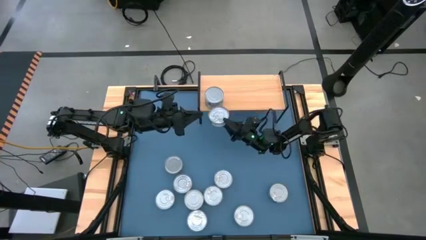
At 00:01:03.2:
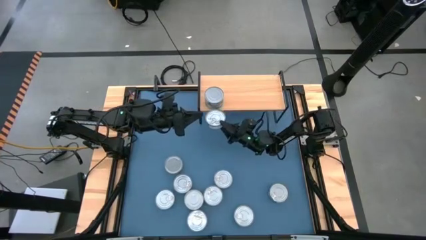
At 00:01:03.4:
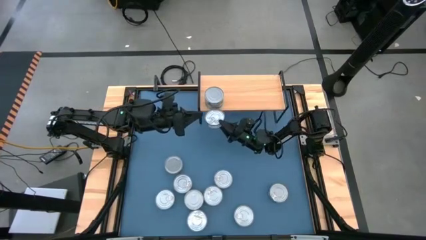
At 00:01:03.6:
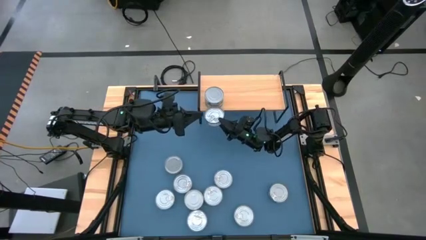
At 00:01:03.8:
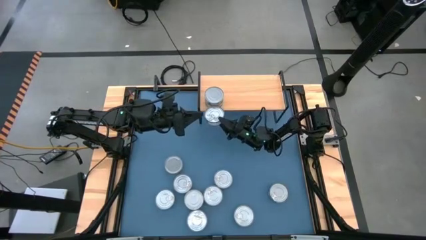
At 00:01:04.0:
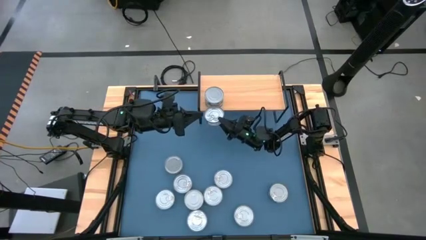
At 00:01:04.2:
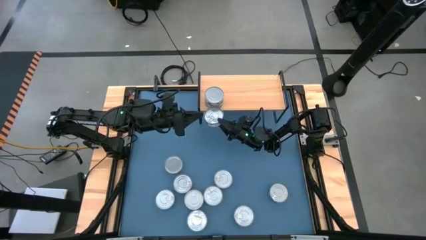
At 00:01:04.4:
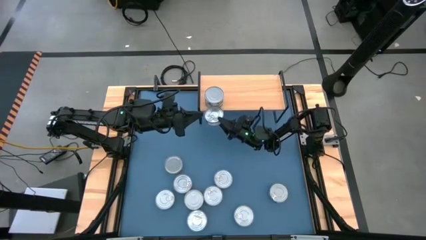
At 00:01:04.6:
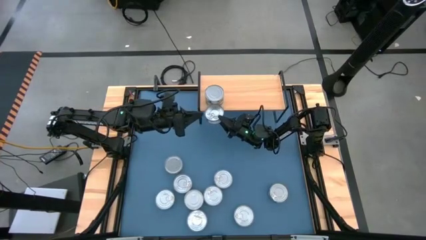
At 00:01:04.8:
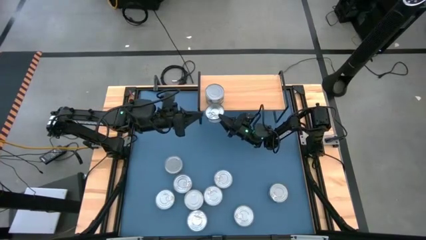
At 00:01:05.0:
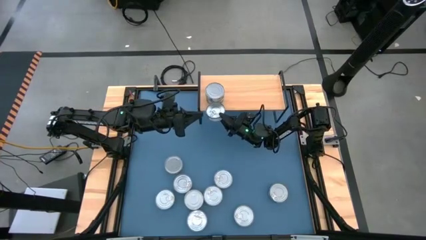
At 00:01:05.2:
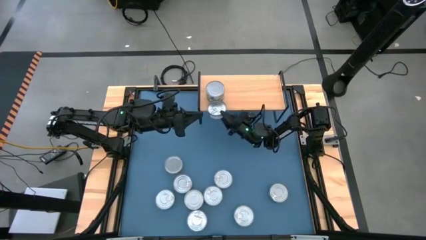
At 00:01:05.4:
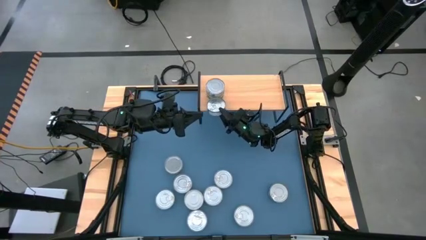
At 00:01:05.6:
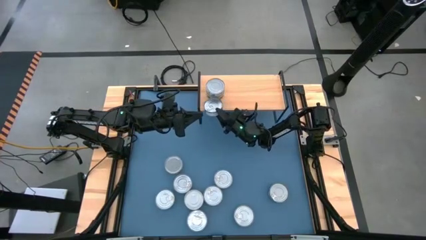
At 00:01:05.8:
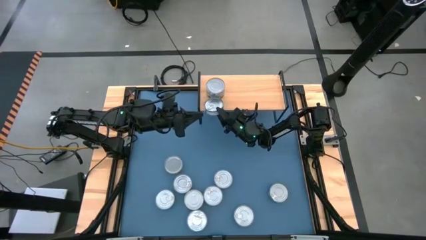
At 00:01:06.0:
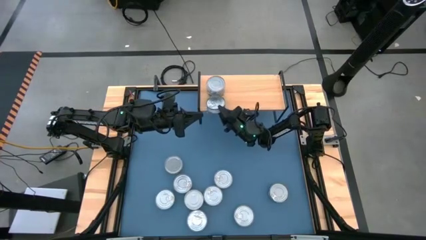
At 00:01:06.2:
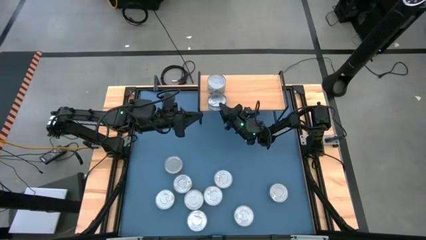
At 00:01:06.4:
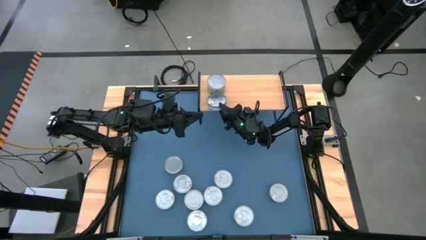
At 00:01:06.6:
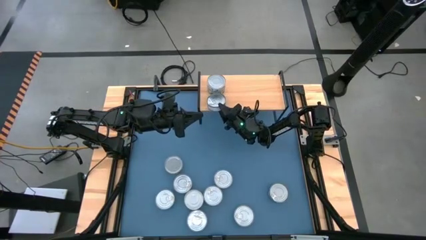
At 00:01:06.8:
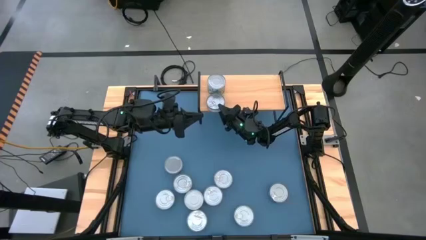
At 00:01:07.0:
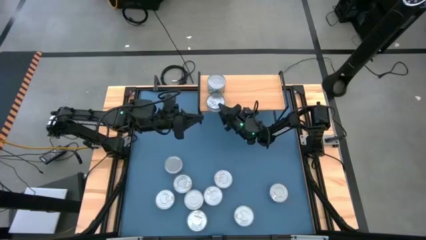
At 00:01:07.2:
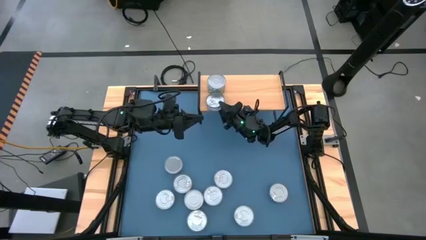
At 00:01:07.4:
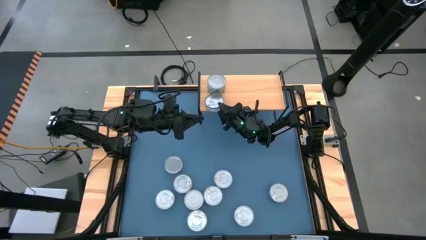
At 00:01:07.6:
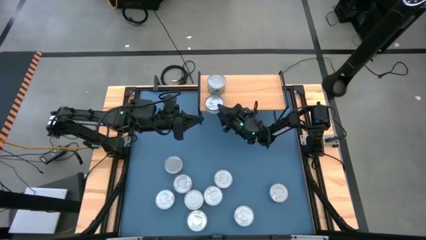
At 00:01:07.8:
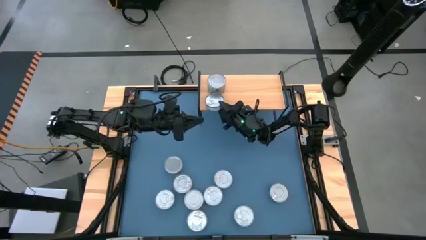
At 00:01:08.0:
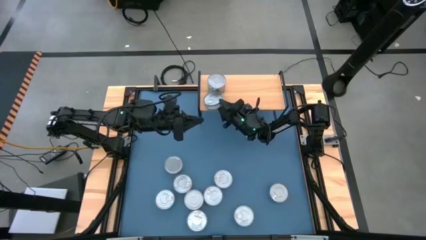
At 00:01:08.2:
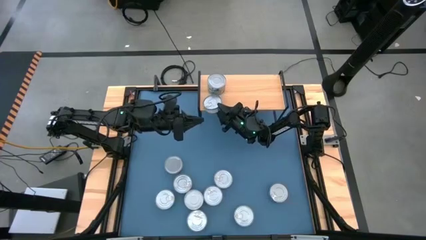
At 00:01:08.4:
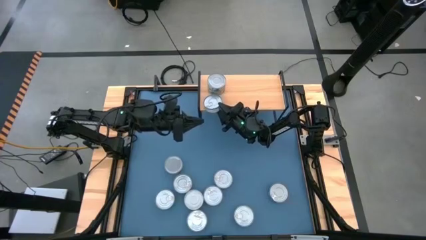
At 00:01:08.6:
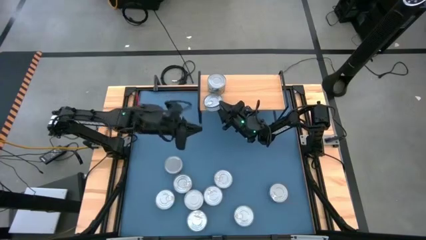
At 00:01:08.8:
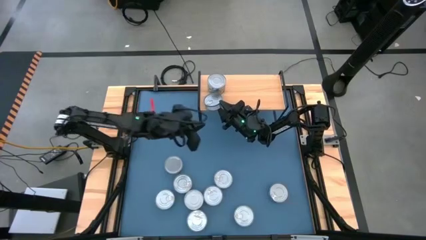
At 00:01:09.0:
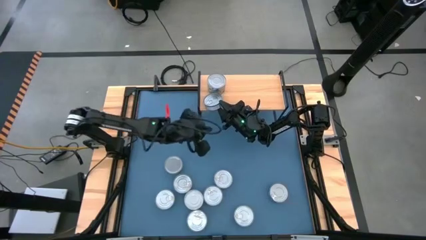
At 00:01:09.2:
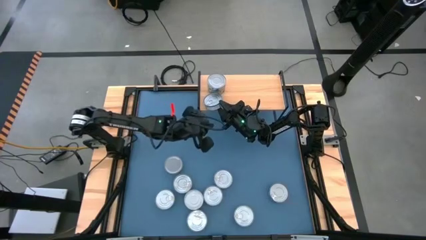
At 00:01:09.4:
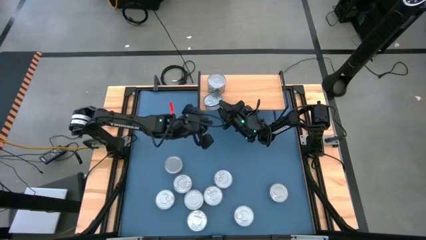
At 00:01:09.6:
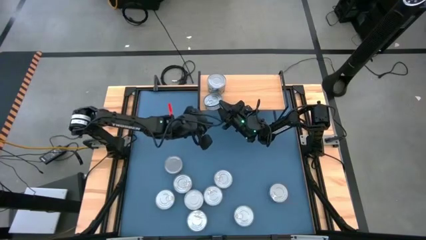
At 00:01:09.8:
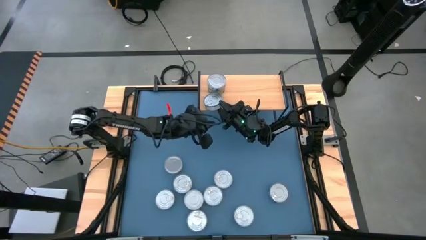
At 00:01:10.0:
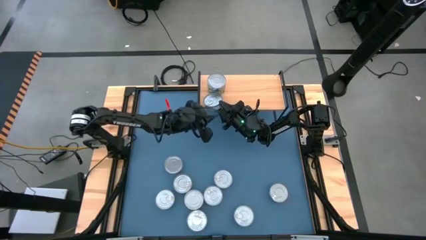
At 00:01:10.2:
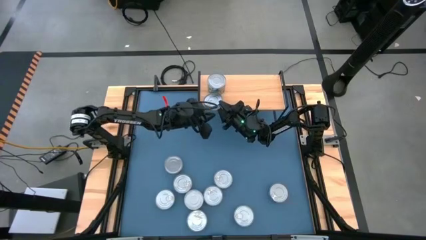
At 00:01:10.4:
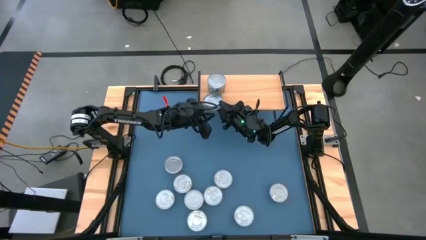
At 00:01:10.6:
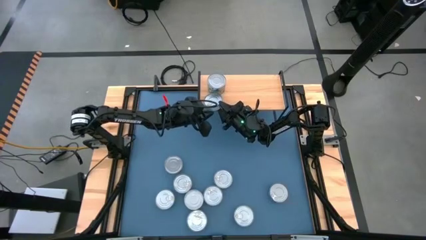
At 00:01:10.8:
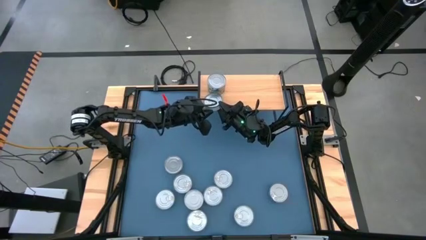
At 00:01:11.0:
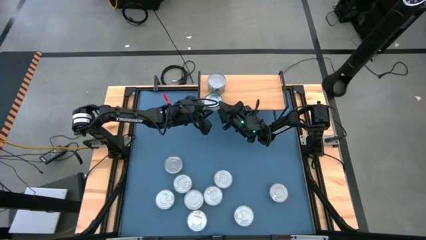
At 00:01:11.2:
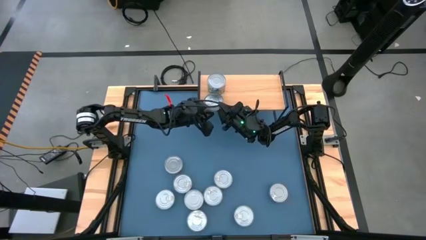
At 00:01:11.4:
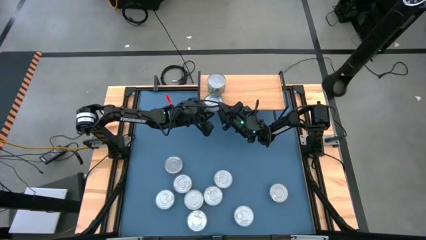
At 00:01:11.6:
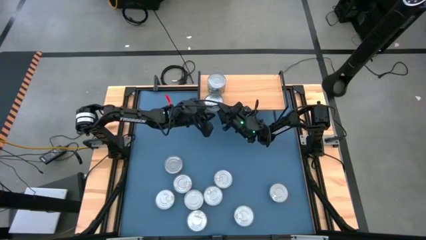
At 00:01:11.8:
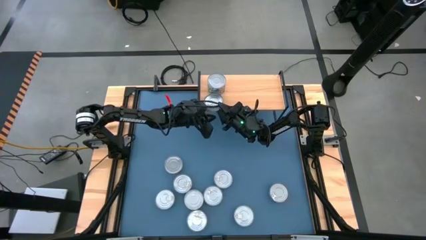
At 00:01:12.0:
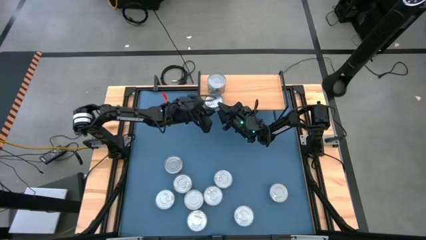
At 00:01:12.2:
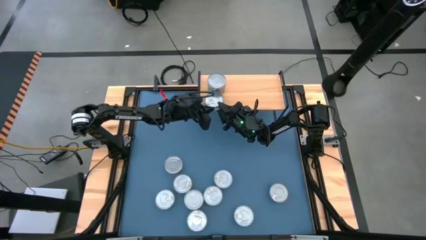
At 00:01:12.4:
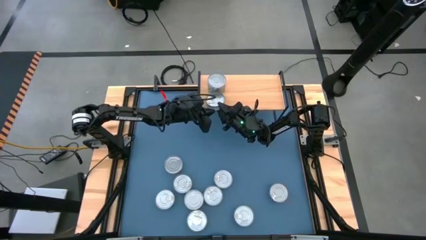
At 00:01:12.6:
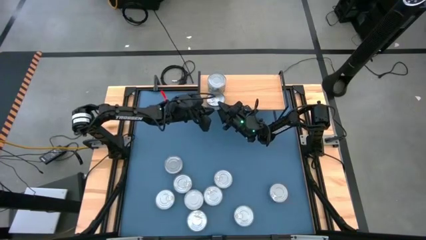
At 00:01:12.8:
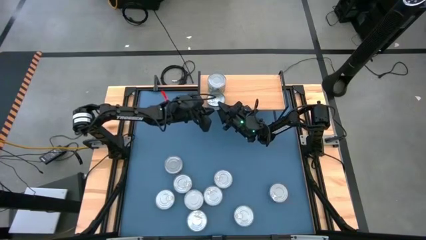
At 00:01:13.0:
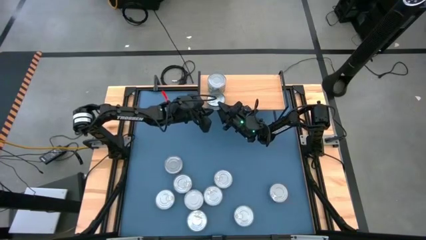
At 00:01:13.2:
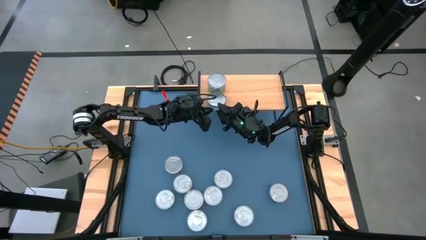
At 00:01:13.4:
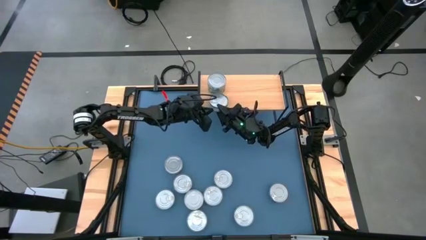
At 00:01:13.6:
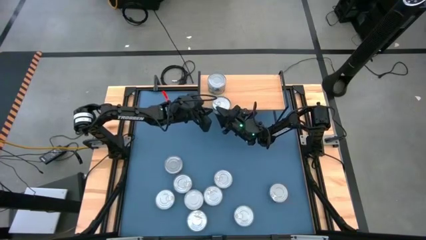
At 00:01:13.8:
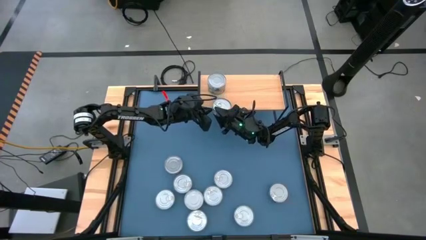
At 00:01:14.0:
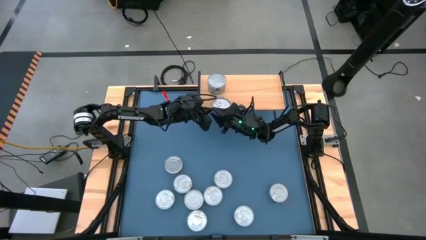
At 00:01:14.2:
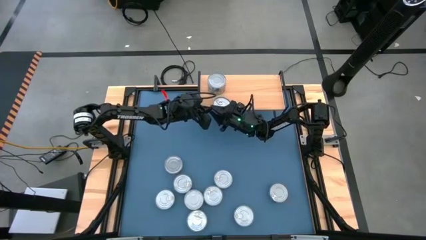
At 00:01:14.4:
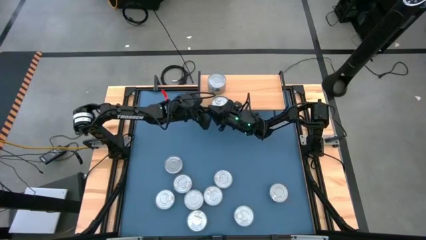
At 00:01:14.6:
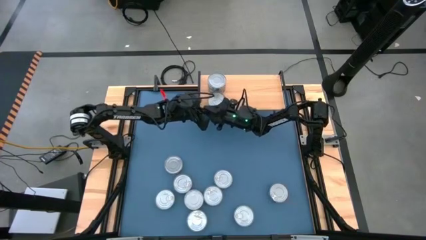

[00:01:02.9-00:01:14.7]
Task: Stack canned seafood by type on shelf
Put the blue tuna can on the shelf

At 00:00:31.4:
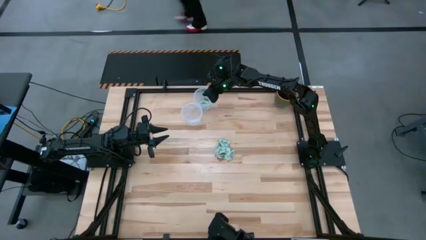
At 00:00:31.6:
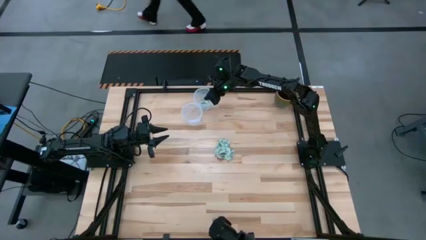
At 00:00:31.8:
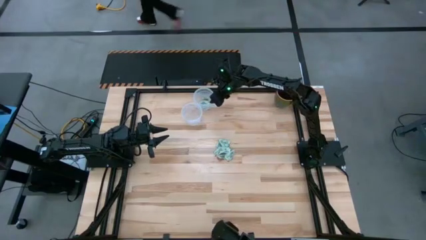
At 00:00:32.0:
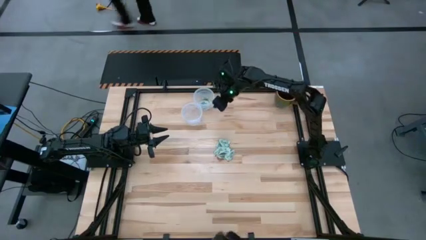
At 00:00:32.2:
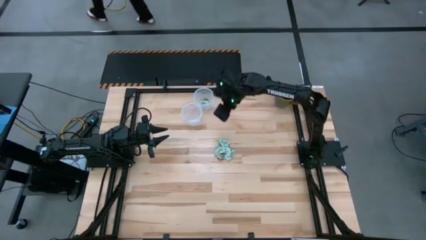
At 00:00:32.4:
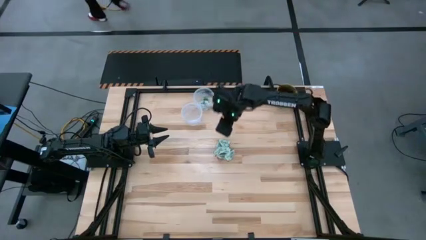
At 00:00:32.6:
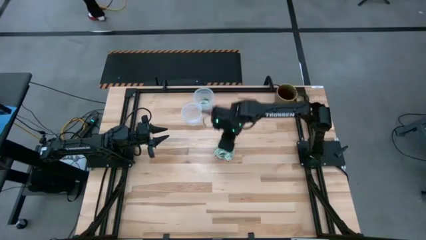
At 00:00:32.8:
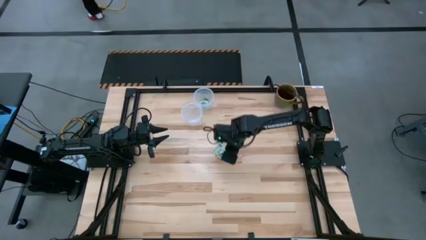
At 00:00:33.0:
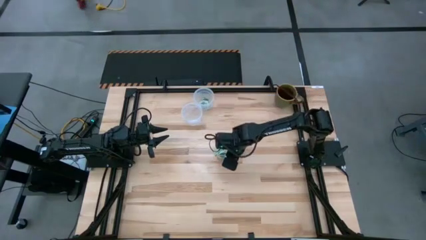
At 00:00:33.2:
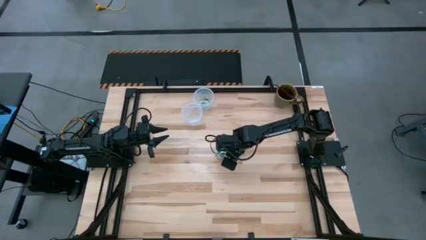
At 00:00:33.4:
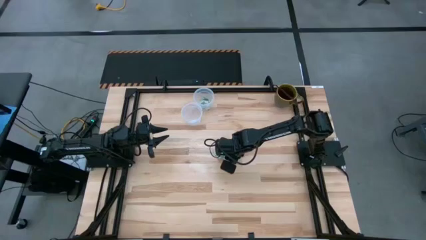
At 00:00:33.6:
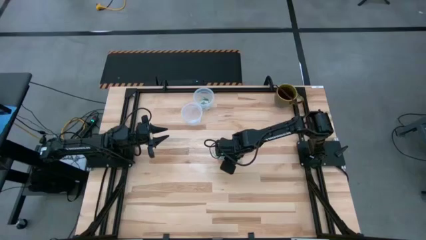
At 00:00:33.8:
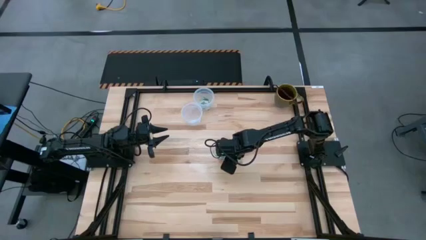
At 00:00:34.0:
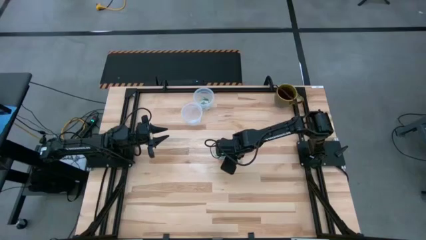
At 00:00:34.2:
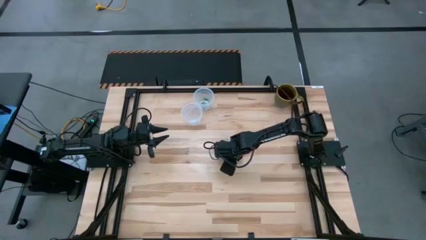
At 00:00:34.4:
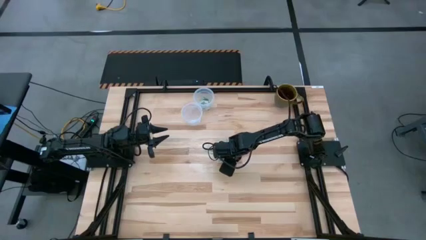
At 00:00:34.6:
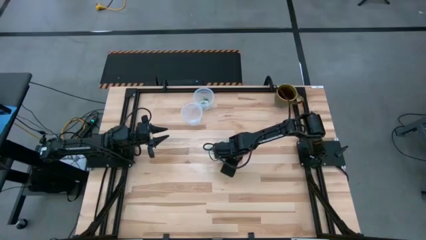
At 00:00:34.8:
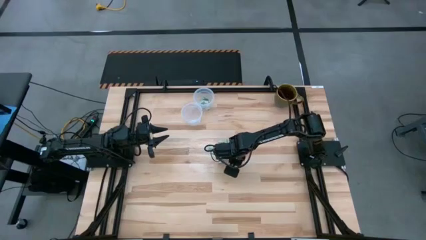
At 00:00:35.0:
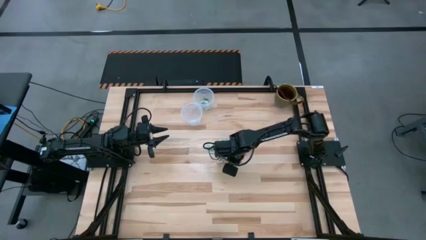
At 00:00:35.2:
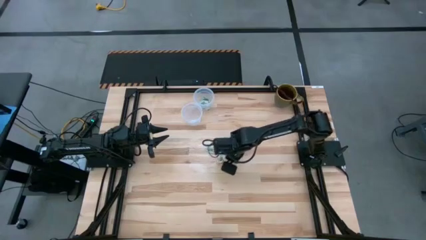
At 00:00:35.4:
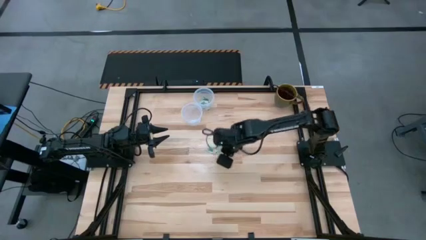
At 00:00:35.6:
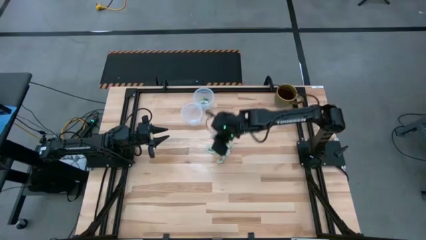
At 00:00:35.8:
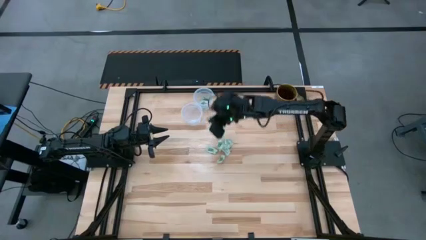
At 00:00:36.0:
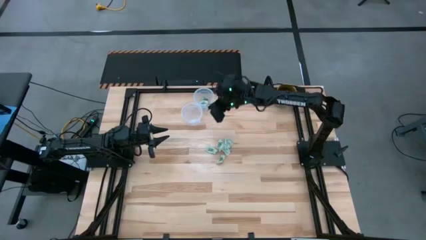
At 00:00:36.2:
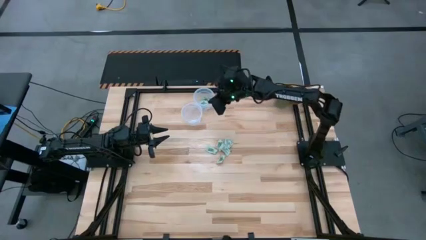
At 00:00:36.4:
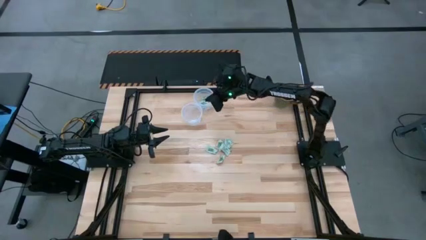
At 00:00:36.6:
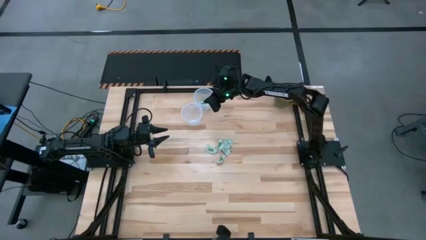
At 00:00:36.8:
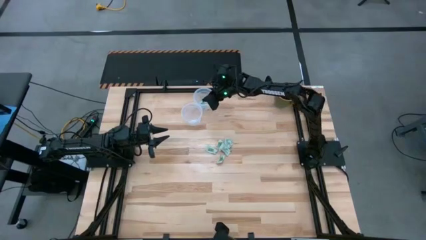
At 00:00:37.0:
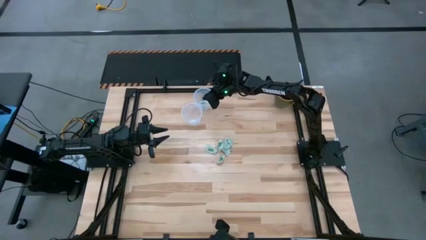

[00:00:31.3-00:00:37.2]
Task: Pick and place items into bin
Put the stevia packet into the top bin
